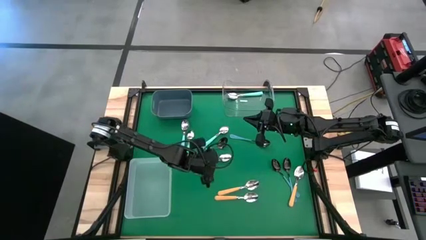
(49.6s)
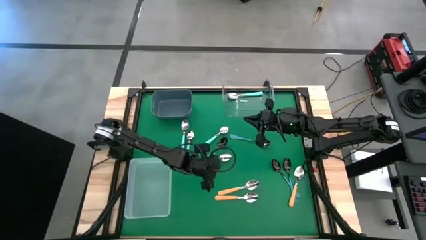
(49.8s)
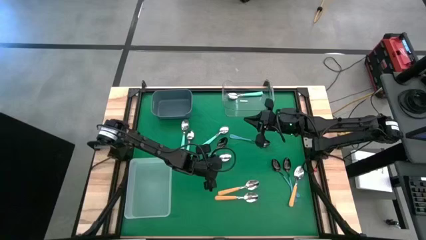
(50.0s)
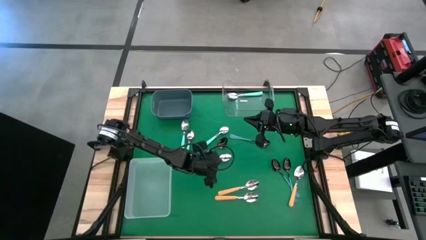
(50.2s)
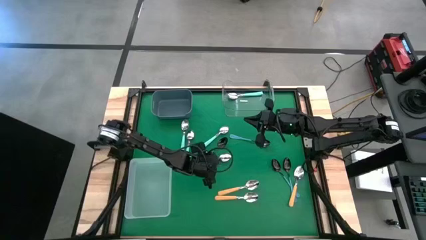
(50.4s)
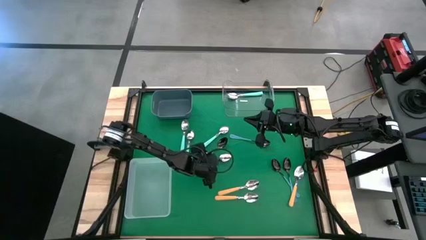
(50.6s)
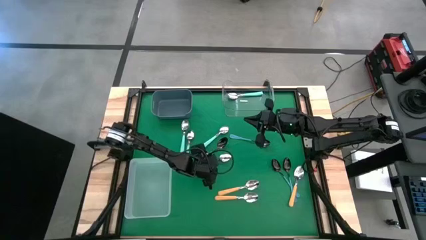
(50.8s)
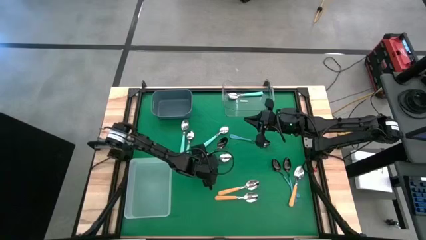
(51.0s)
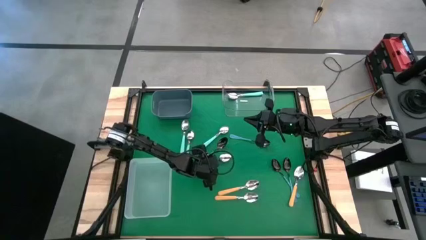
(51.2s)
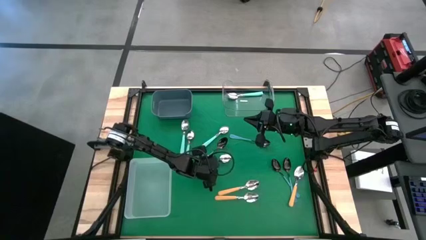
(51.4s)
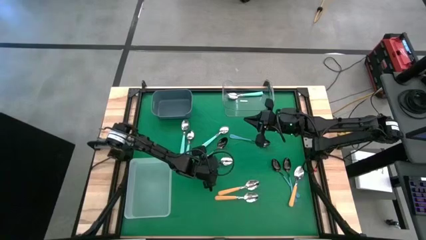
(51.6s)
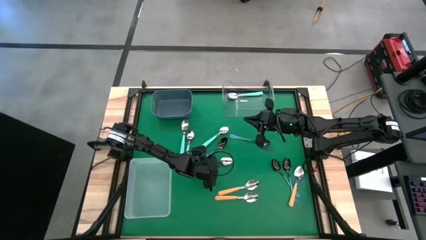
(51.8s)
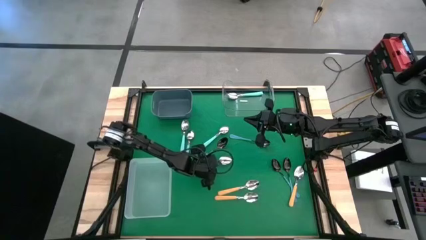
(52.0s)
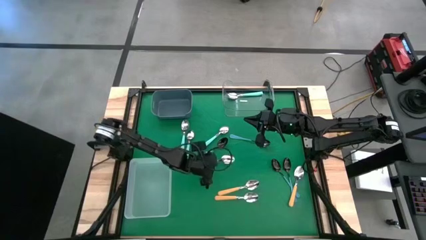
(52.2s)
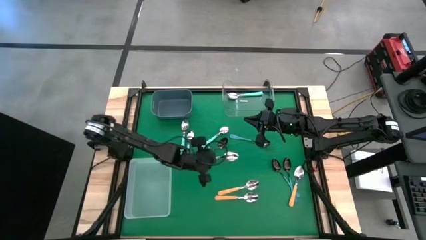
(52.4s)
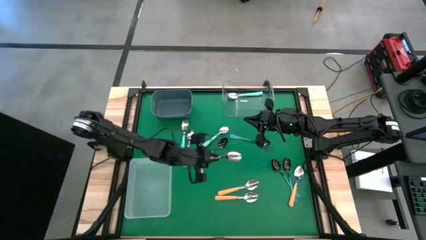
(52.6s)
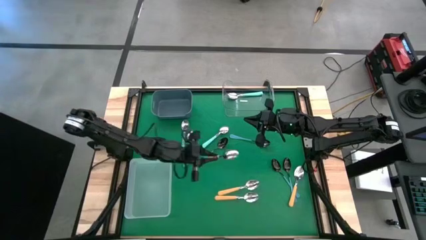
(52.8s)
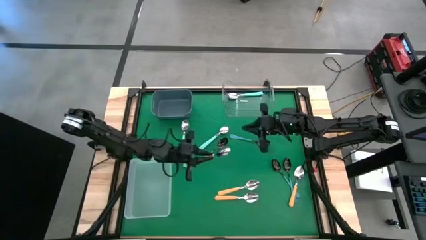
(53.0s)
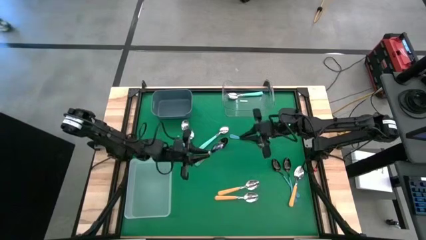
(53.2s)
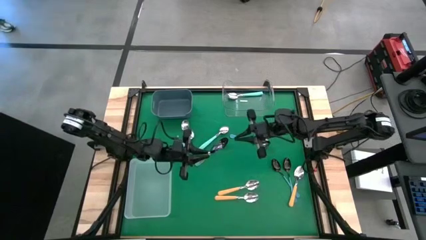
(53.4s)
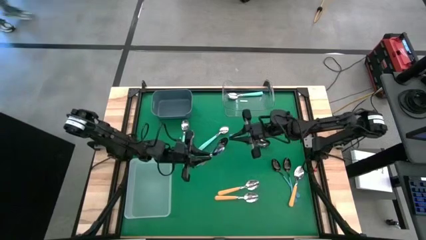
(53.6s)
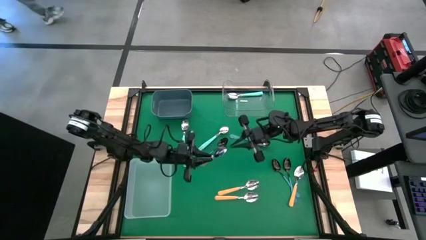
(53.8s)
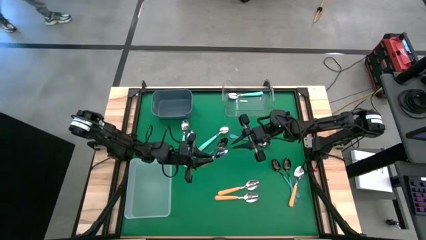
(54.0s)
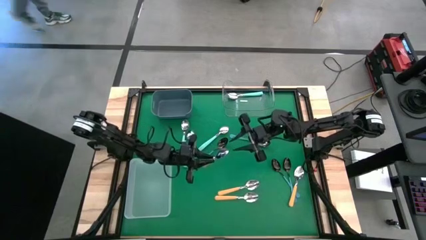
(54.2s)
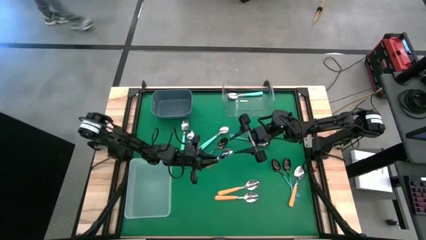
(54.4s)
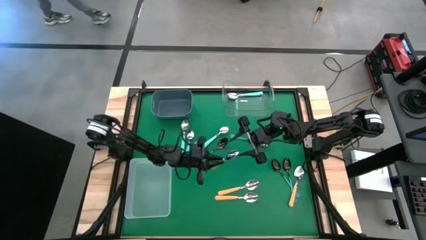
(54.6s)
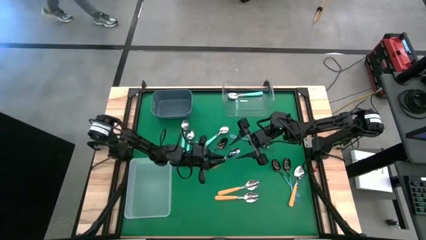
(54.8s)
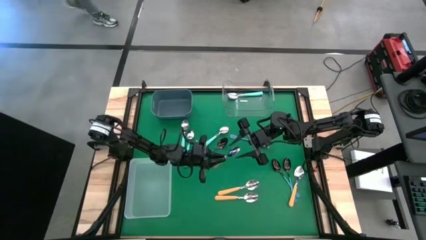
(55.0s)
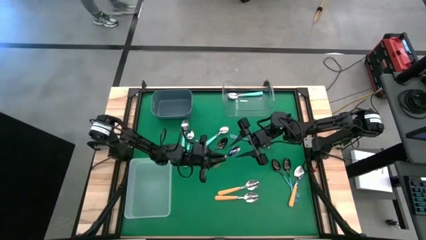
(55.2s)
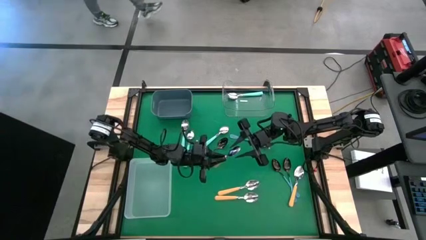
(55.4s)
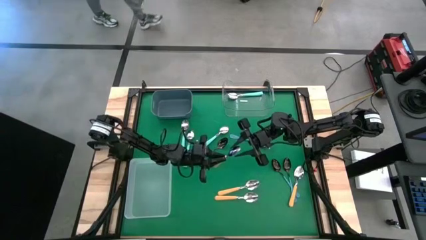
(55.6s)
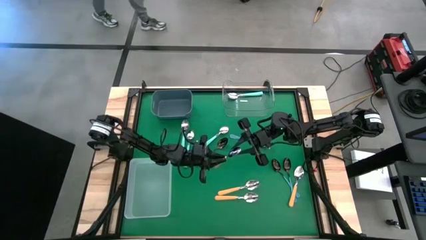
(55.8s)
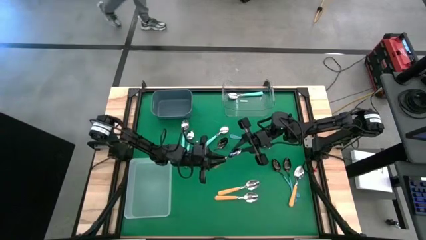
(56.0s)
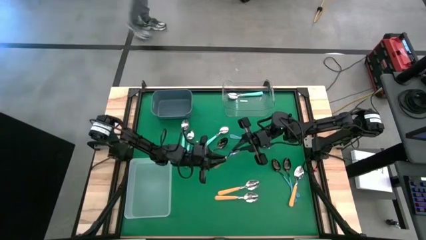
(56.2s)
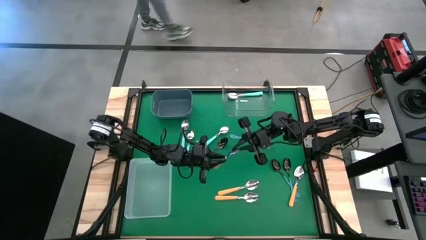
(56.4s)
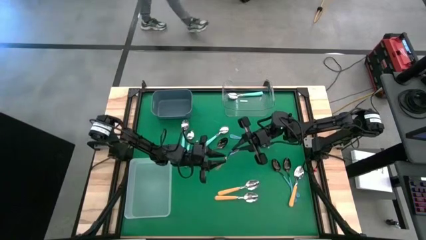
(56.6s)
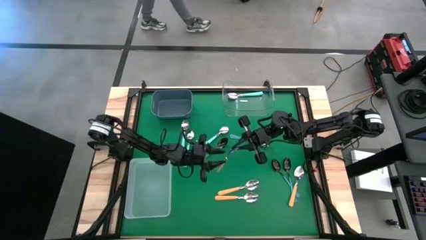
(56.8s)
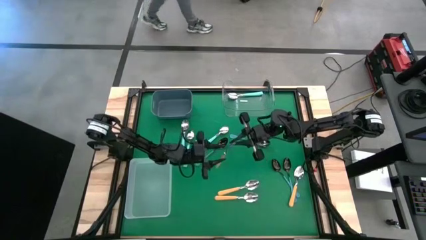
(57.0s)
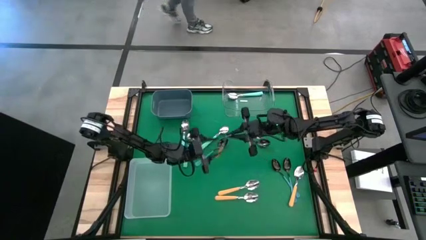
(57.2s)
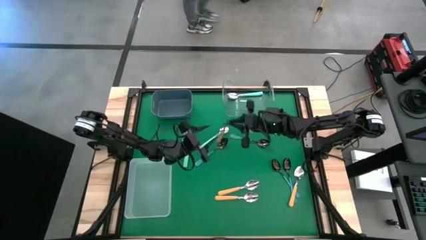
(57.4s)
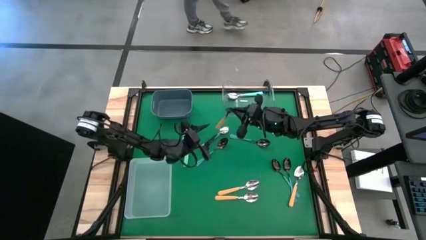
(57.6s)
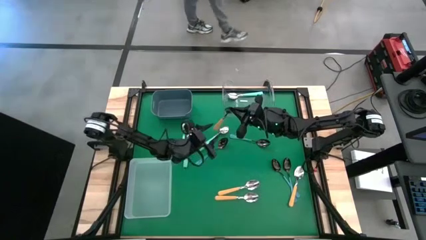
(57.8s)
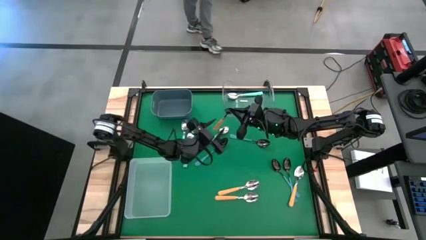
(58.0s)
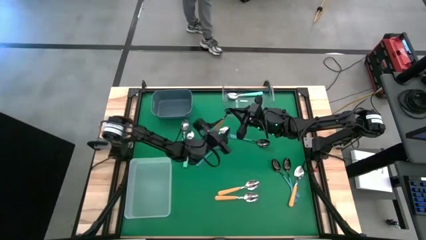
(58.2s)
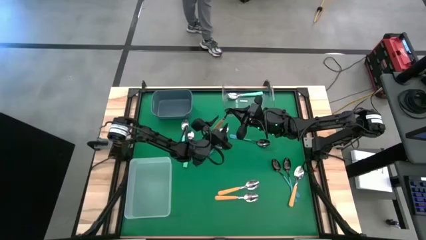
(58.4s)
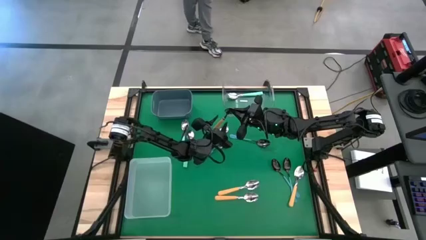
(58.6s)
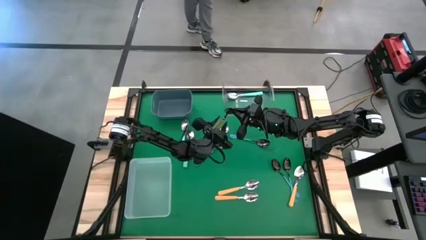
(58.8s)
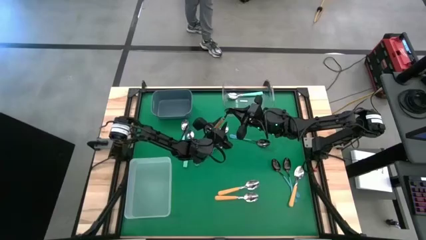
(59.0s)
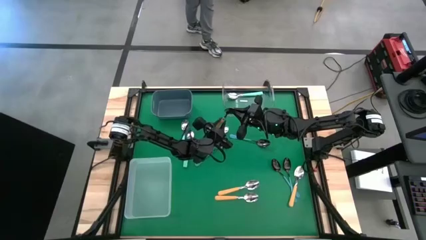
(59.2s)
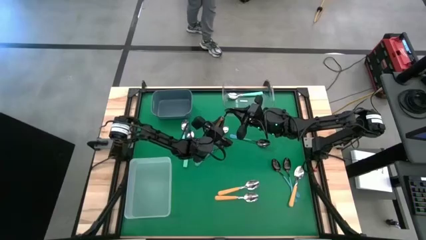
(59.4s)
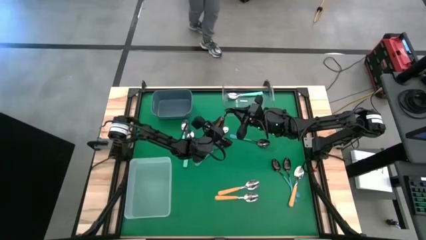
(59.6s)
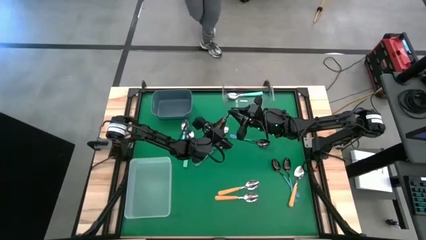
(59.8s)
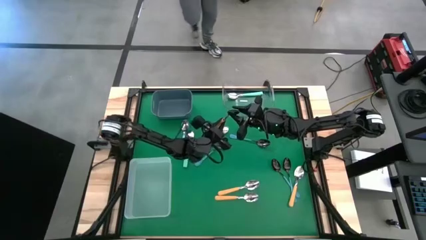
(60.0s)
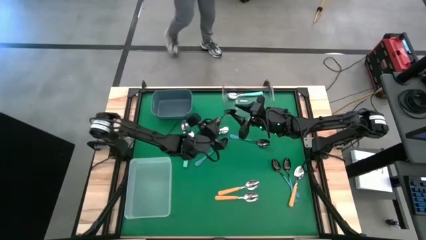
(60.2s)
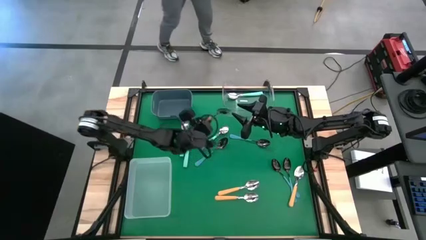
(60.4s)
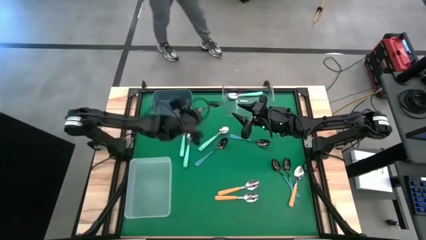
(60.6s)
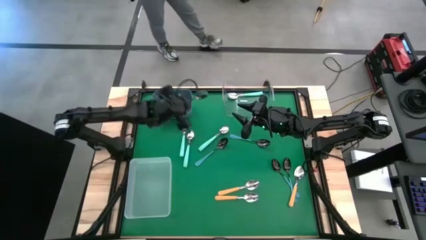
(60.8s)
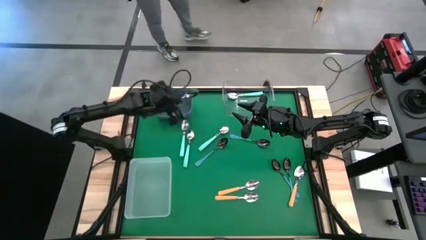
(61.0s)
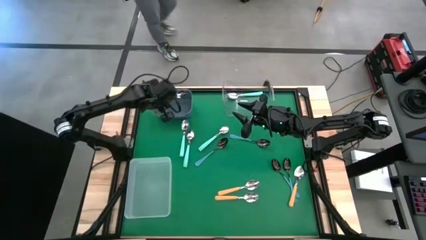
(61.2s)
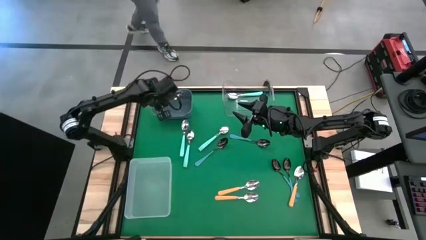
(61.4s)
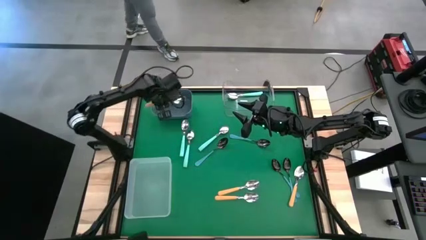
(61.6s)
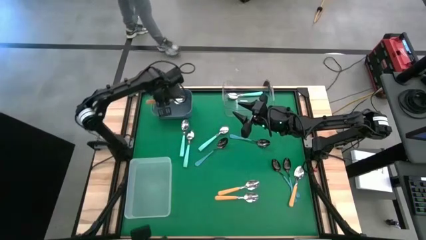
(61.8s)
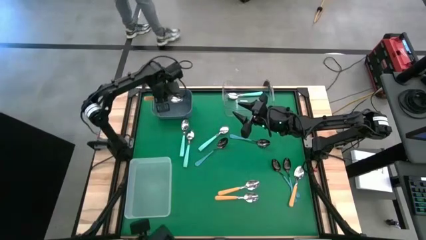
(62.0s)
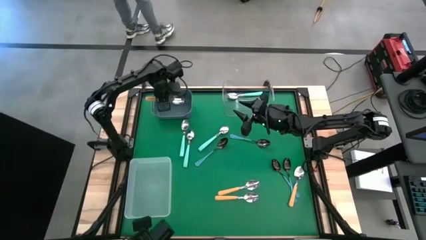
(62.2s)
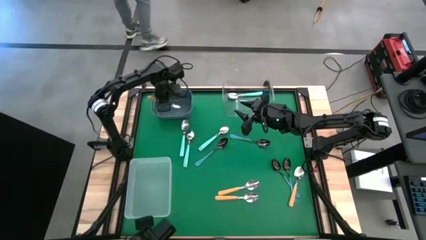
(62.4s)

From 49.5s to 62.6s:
Task: Sort silverware by color (type)
Put the yellow spoon into the gray bin

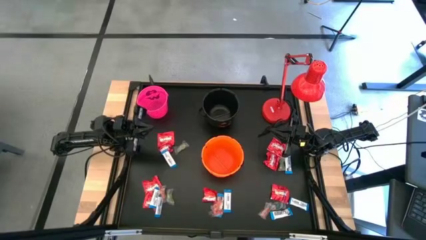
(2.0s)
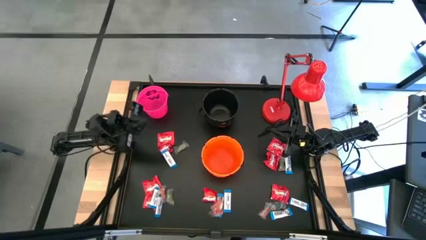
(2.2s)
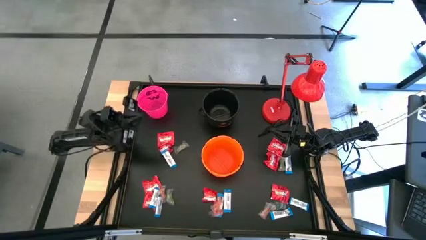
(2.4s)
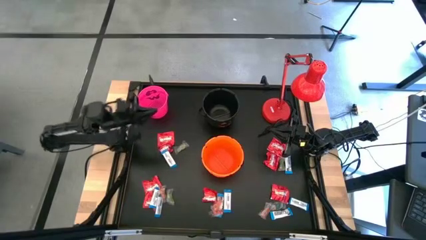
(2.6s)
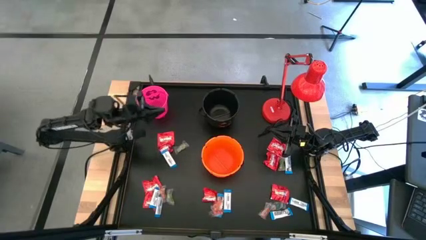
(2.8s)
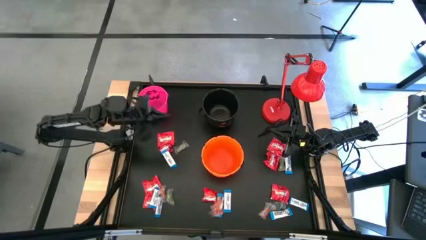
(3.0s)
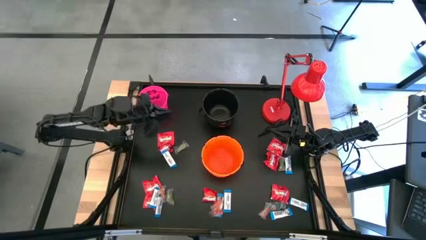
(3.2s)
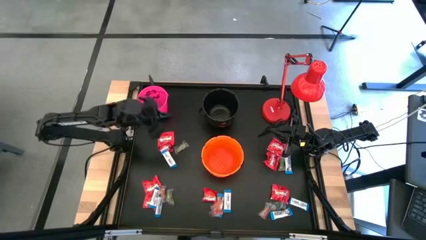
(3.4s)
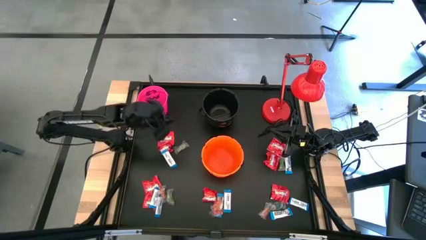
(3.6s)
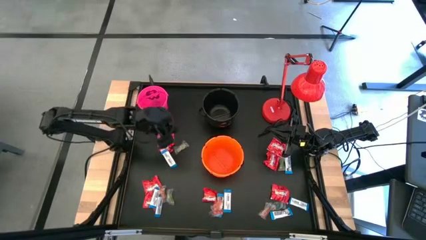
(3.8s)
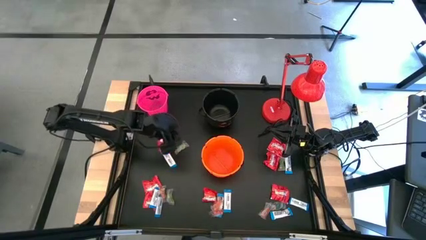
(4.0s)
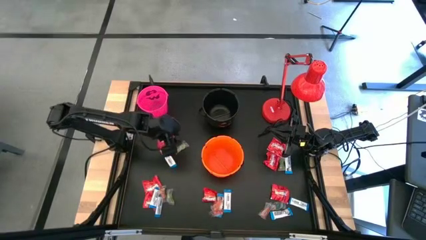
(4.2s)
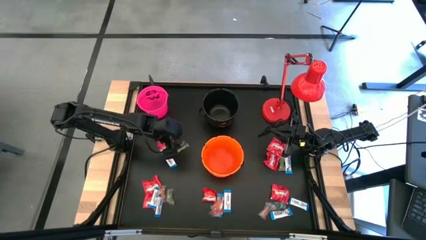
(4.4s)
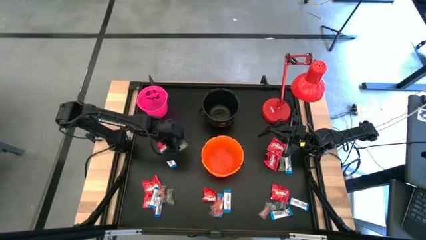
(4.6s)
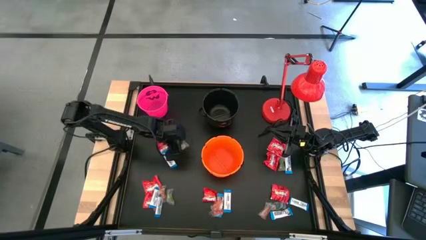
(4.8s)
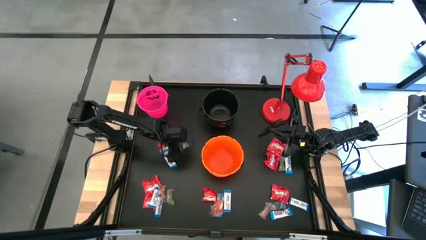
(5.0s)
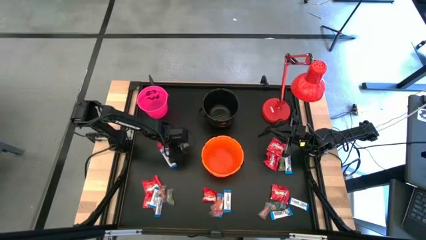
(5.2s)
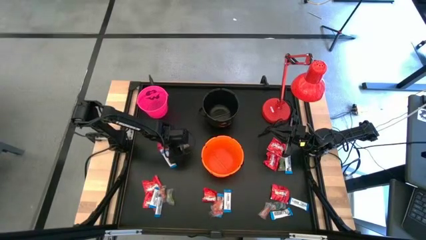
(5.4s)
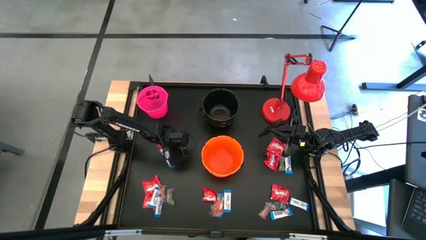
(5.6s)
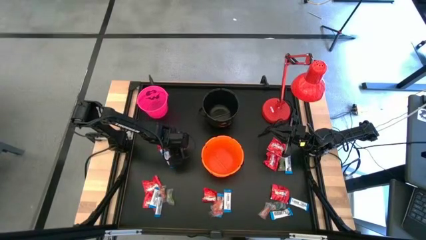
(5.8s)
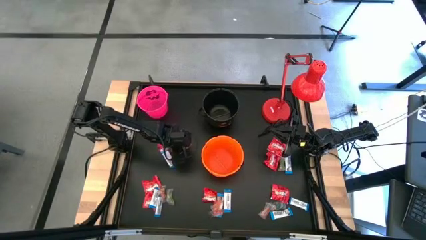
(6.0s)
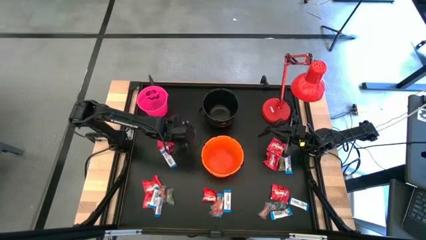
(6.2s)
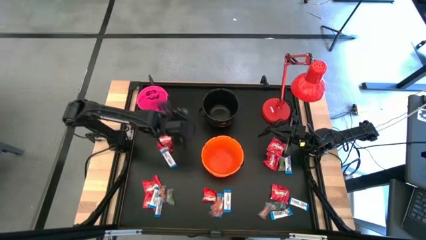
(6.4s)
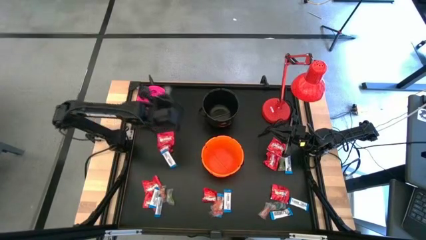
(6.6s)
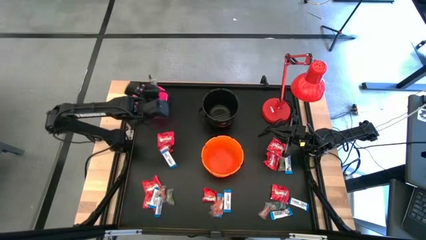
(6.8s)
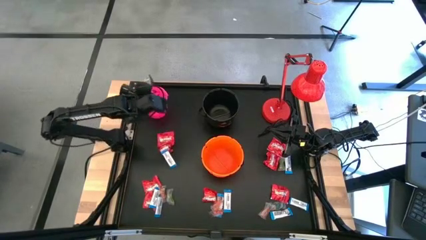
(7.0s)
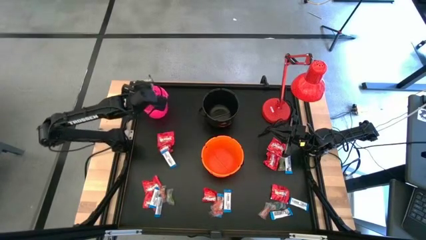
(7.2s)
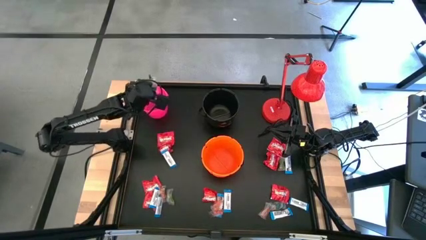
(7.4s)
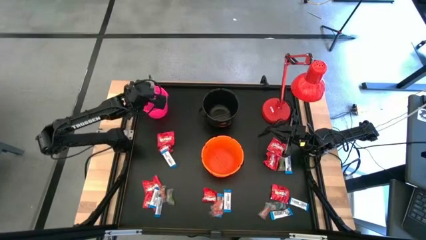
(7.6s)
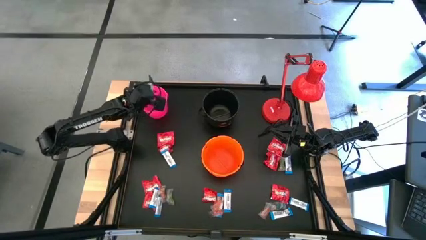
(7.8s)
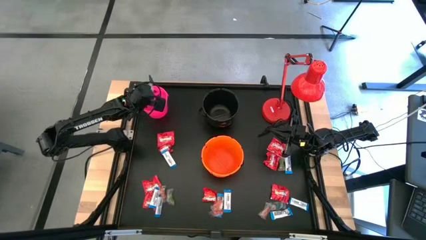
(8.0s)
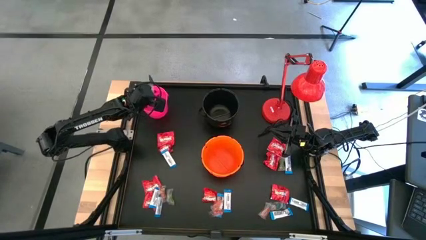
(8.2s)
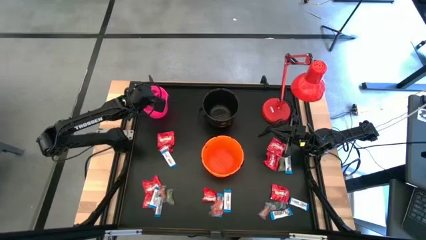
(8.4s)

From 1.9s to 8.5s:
Task: Sort candy
Put the green gummy into the pink bucket
